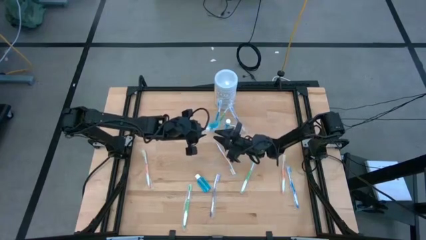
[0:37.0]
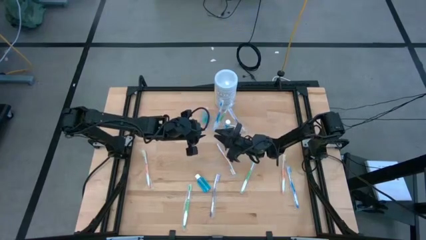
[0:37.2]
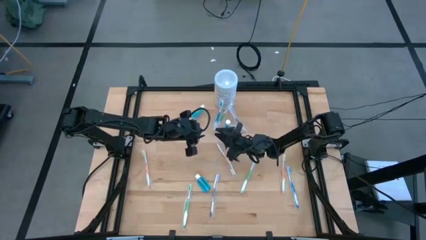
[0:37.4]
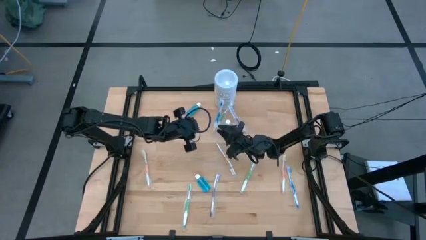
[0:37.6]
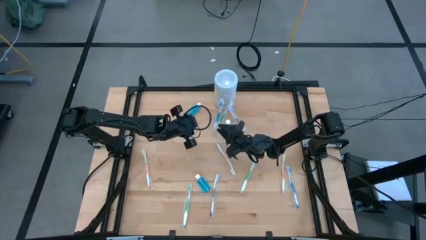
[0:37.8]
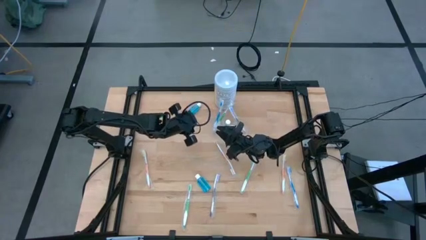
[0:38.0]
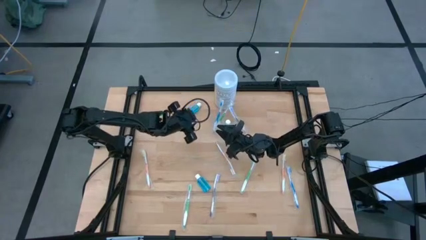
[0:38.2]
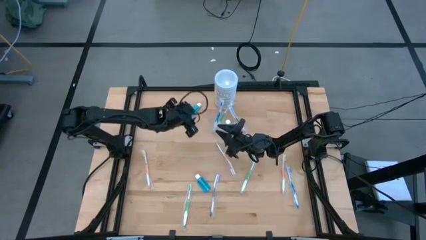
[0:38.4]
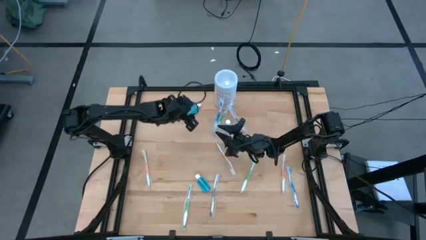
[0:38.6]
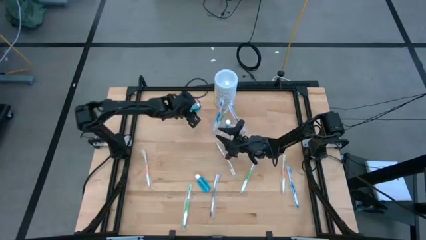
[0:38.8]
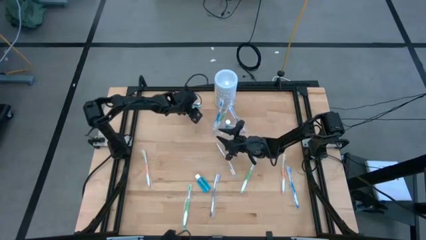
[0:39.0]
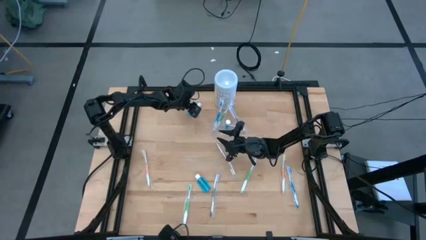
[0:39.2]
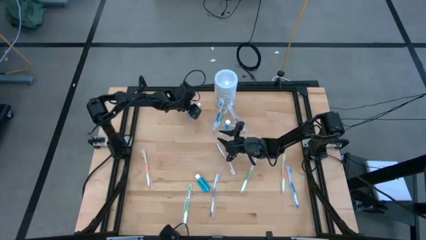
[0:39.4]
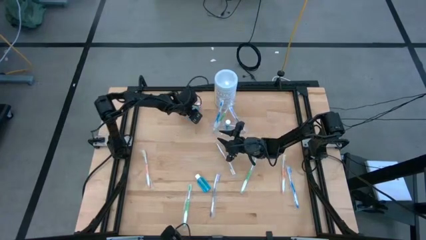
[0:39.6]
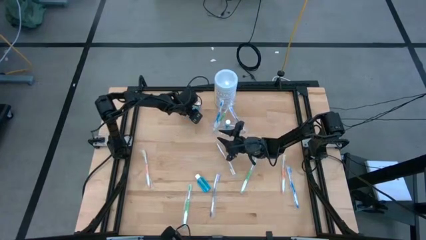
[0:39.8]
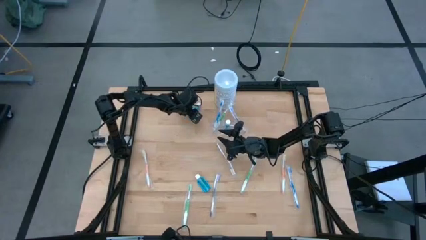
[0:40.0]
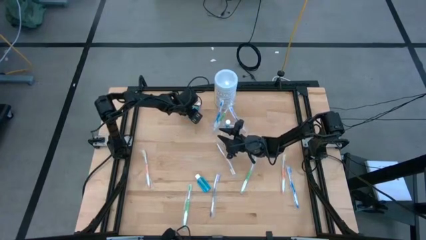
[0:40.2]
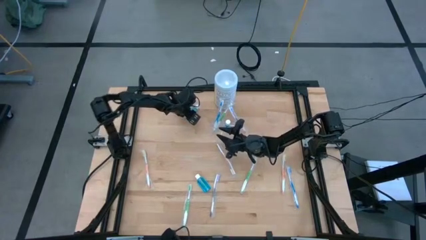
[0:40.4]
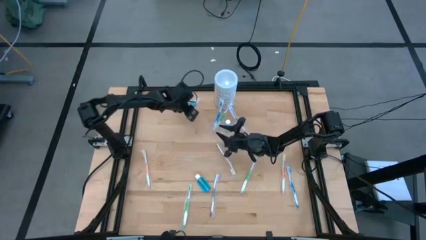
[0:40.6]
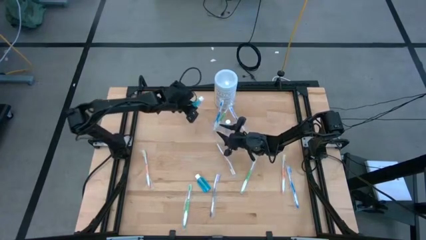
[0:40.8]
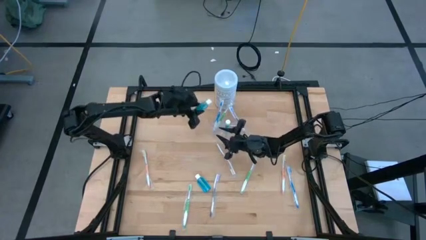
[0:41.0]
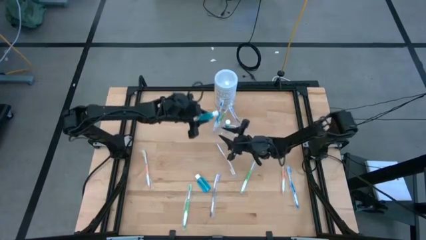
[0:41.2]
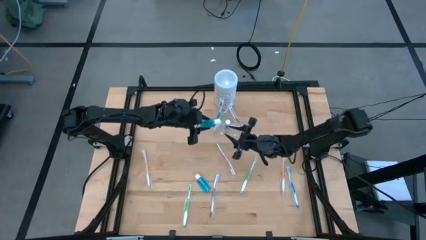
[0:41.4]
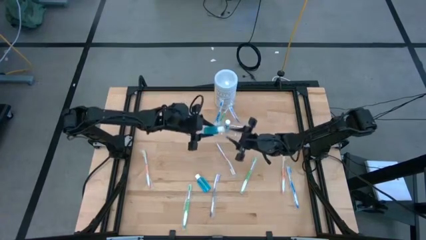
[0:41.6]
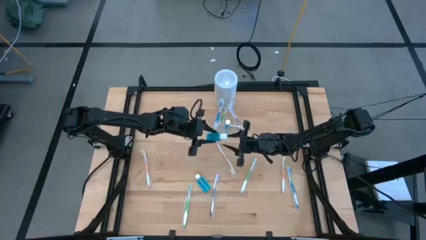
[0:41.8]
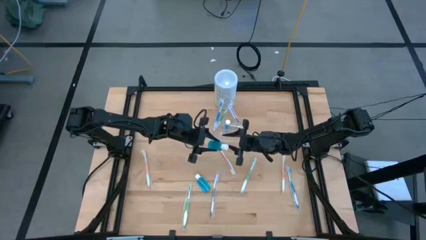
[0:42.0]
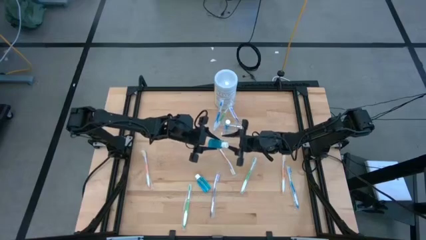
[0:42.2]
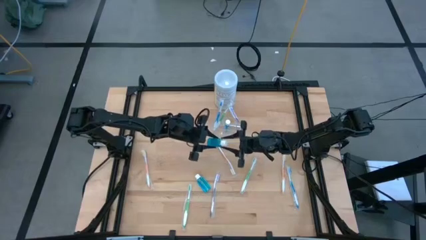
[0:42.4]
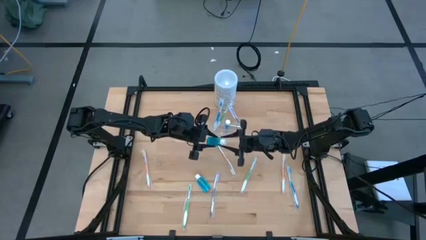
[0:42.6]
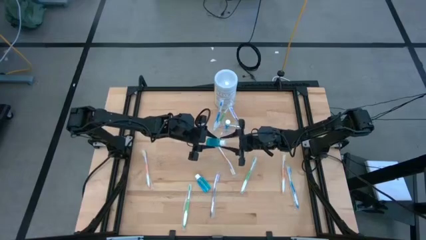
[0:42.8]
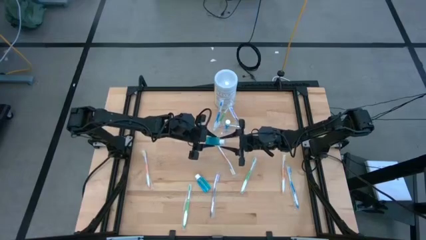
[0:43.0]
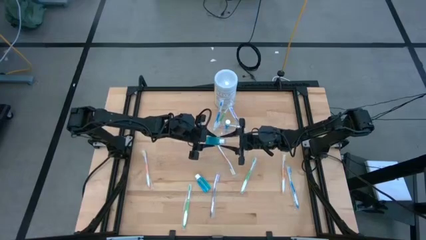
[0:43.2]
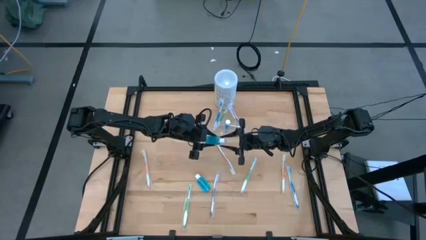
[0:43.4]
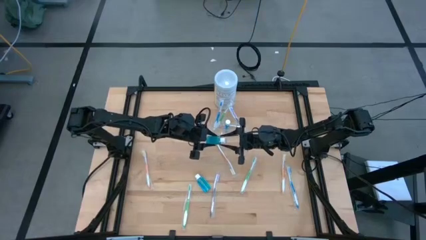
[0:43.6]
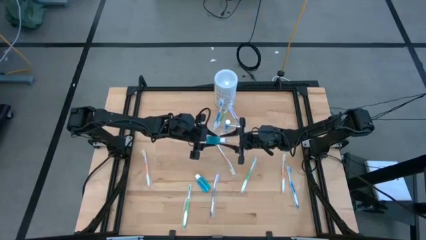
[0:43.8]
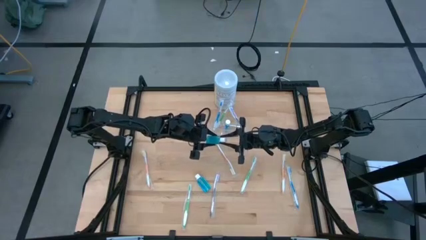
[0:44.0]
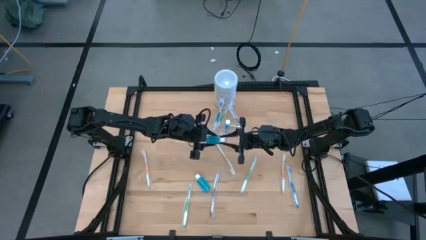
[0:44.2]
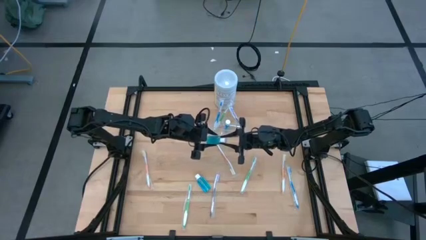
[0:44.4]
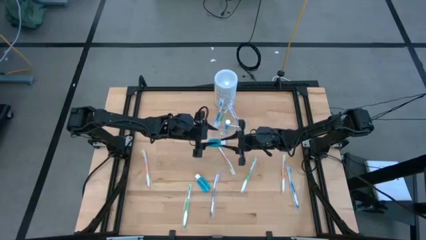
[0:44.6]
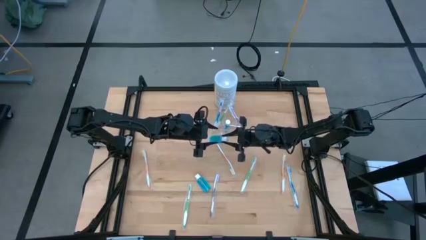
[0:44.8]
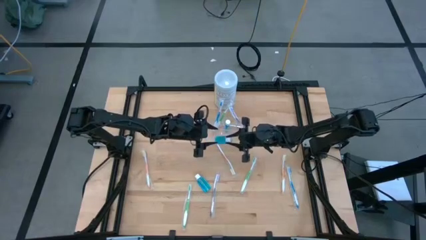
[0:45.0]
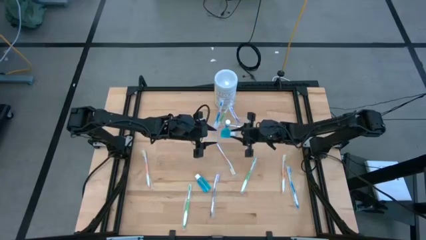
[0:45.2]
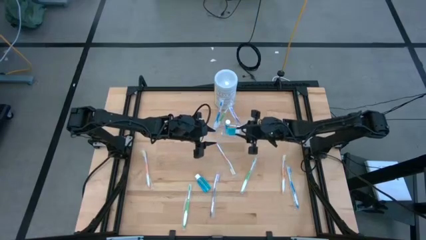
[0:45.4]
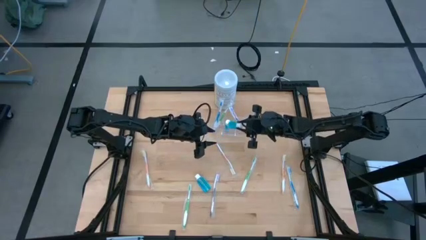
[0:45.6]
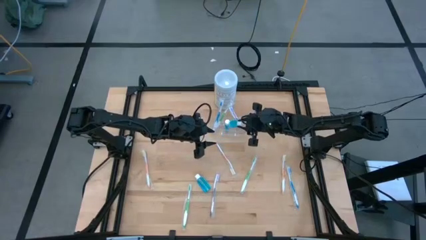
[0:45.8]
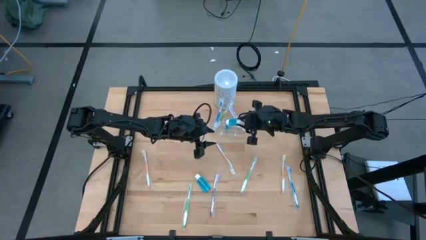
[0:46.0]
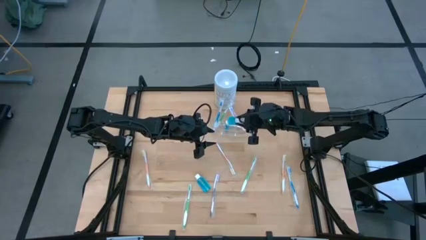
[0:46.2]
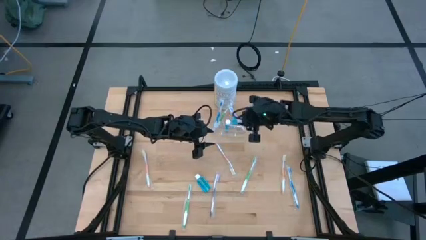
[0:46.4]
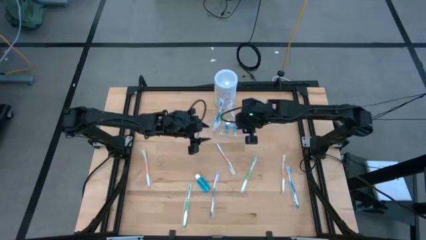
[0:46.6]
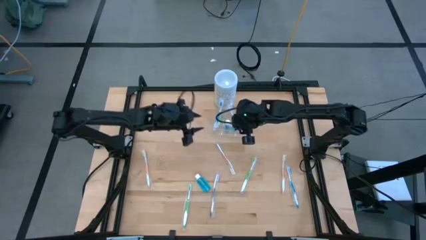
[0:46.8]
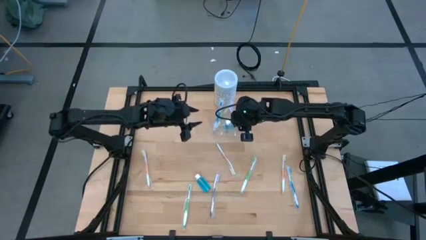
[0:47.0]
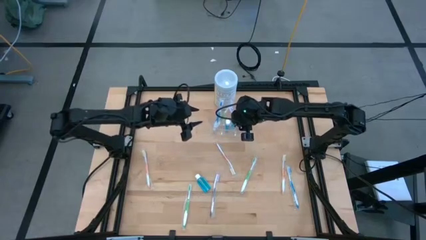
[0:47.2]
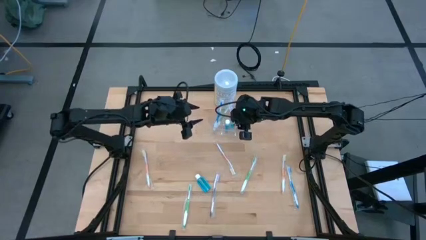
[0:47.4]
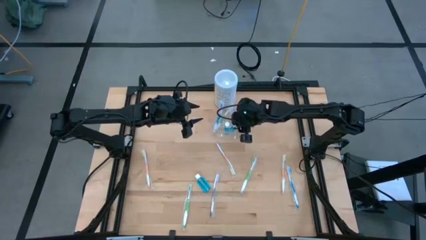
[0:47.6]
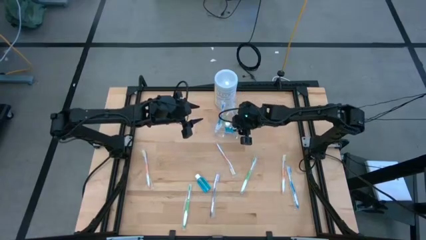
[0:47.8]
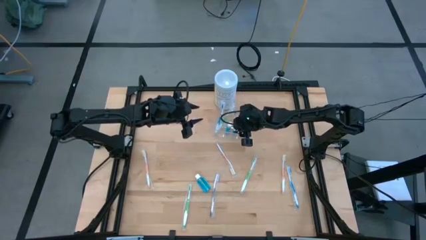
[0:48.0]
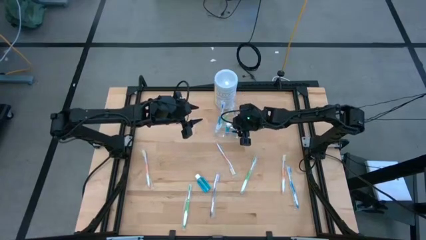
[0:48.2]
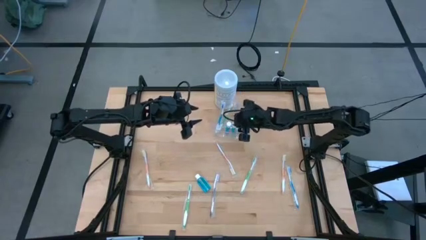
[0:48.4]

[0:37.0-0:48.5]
Task: Pick & Place toothbrushing station
Put the top mouthwash into the transparent organizer

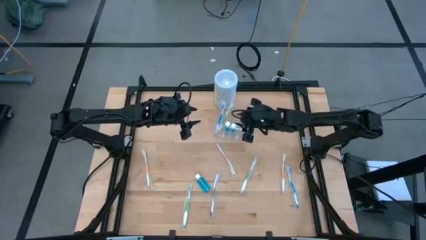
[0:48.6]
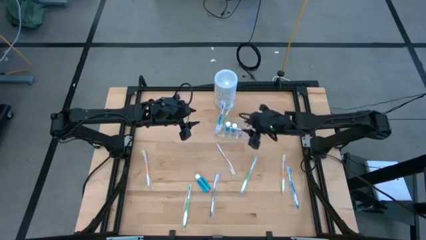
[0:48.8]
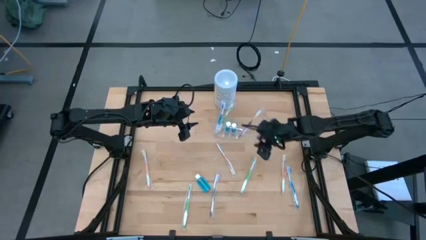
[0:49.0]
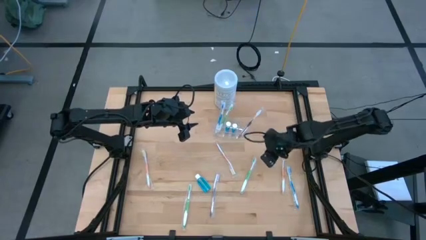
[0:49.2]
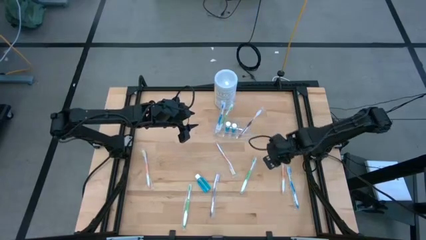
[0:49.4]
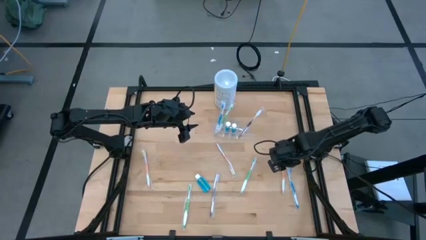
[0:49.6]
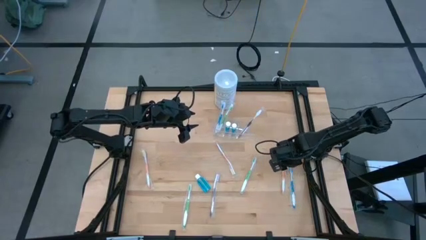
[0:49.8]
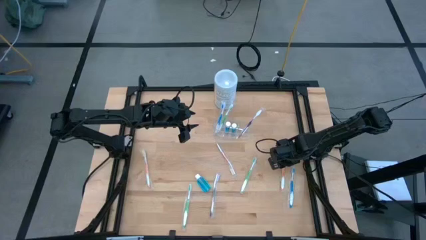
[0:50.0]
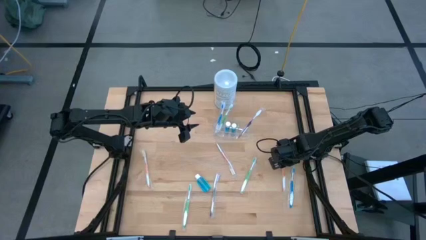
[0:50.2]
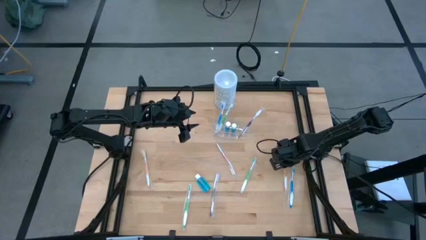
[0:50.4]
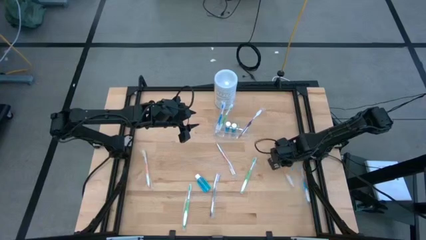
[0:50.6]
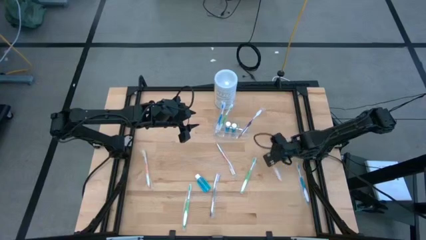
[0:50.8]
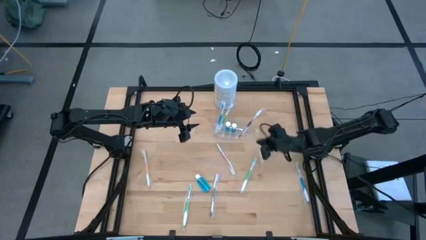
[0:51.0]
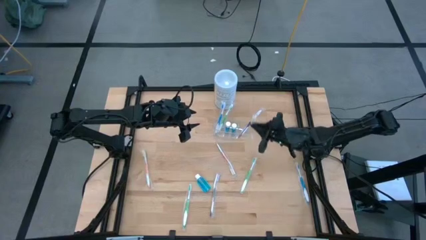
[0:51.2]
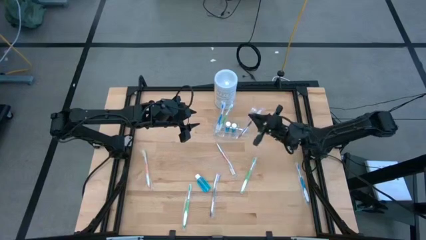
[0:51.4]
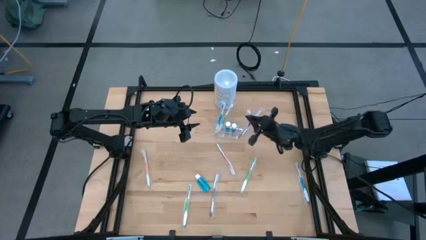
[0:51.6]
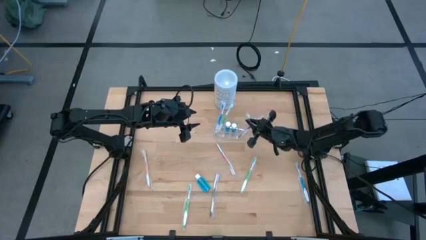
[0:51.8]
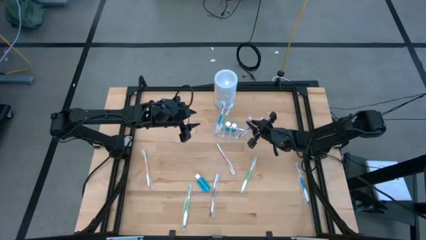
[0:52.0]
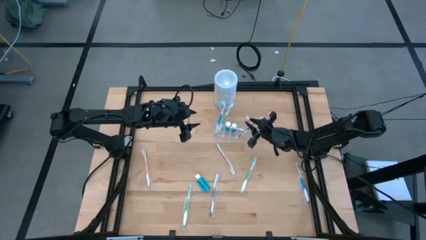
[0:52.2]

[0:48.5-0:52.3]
Put the right orange toothbrush into the transparent organizer

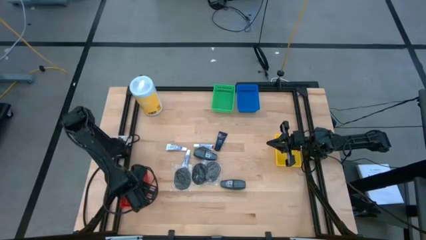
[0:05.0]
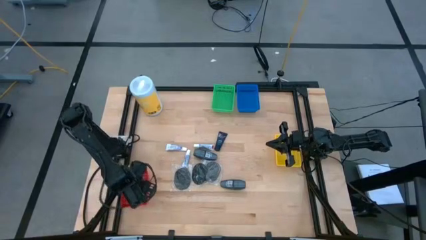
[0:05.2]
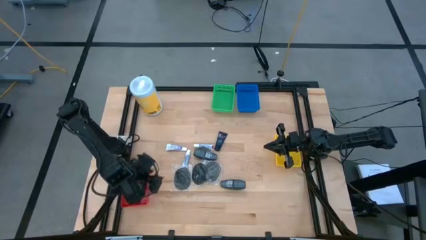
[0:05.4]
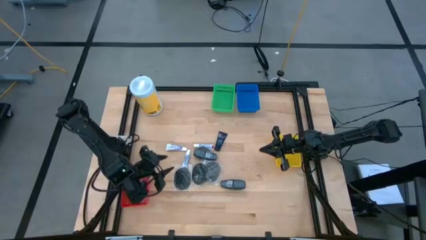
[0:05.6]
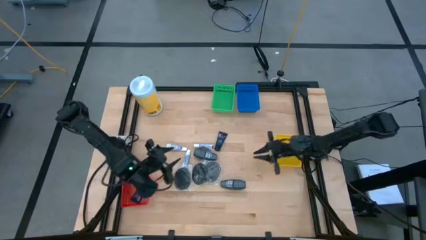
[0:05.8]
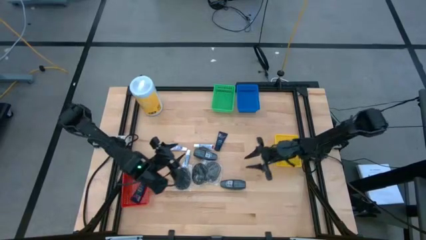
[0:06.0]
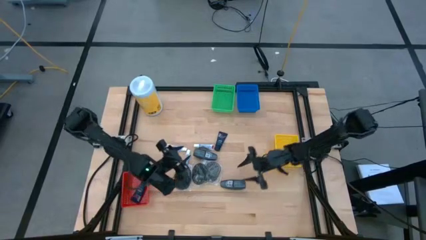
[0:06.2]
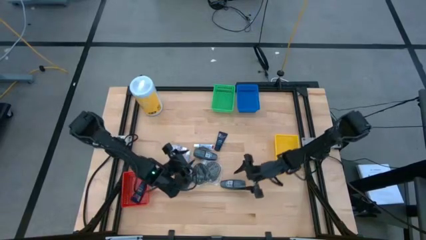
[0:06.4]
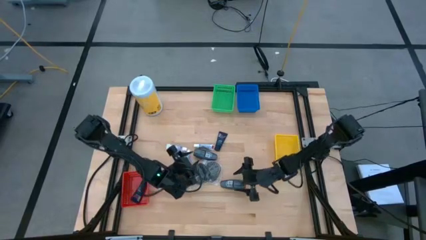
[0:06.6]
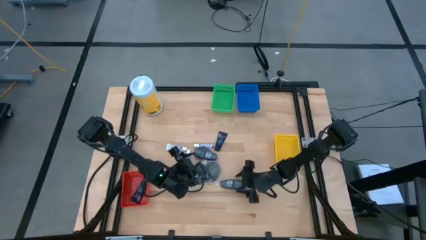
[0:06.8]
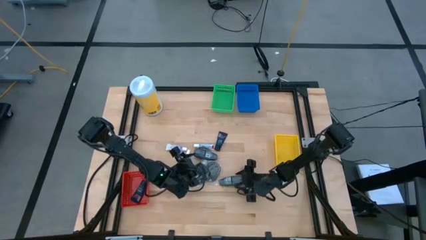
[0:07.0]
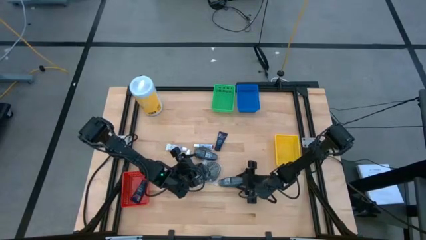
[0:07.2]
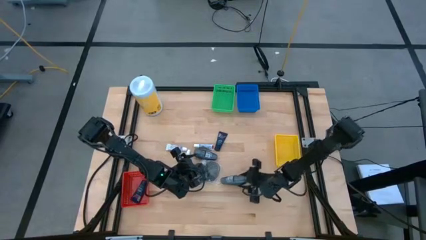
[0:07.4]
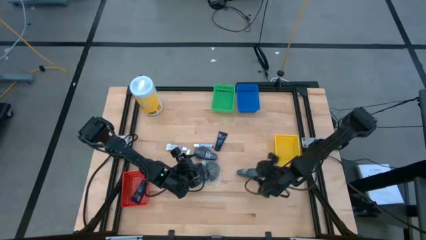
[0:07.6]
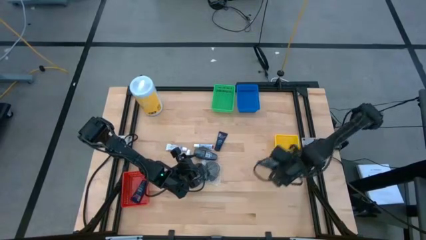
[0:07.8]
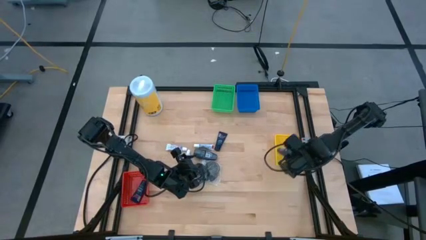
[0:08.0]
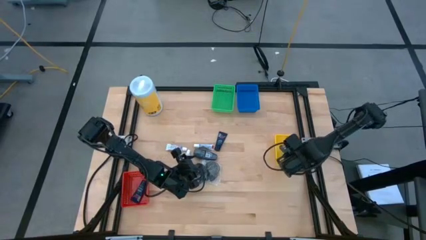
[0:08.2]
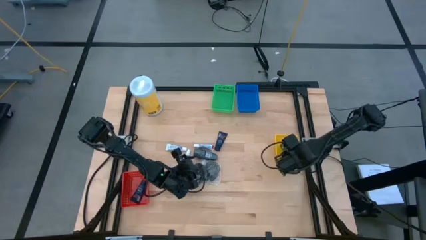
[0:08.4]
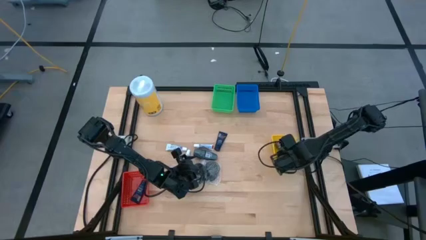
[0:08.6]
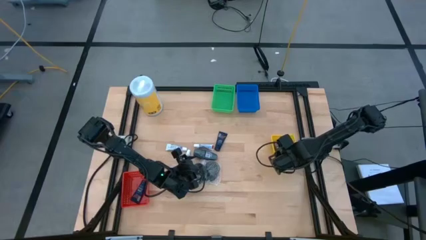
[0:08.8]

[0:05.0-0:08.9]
Task: Pick & Place Travel size toiletries
Put the gray deodorant into the yellow basket
